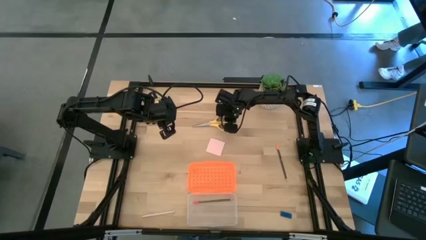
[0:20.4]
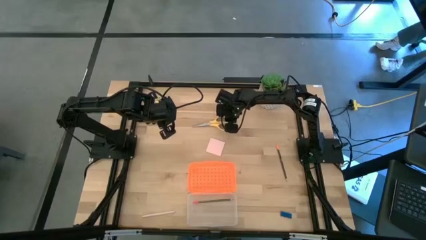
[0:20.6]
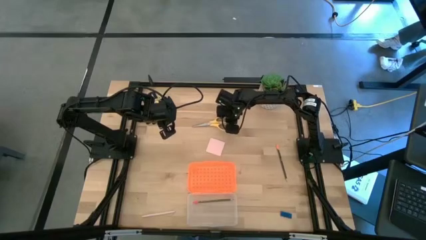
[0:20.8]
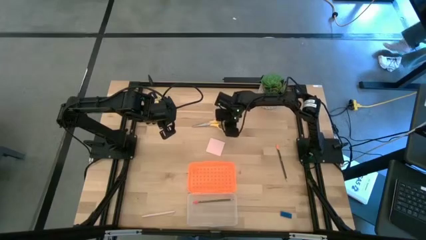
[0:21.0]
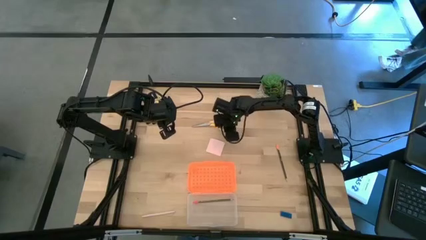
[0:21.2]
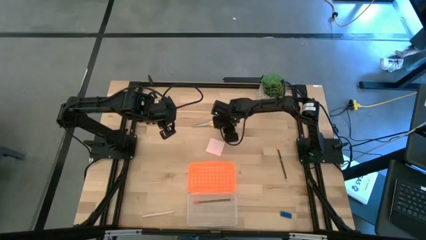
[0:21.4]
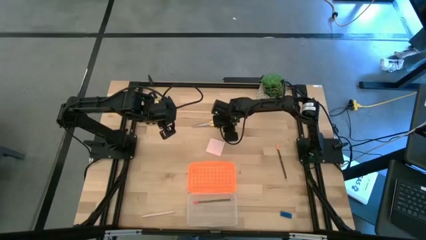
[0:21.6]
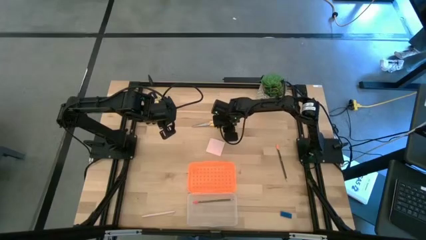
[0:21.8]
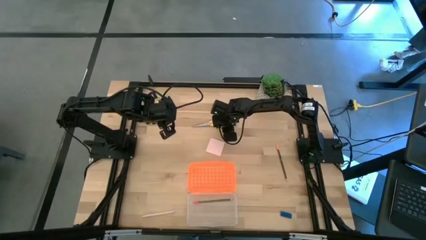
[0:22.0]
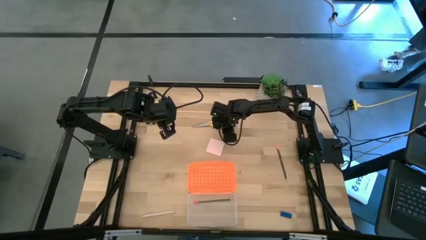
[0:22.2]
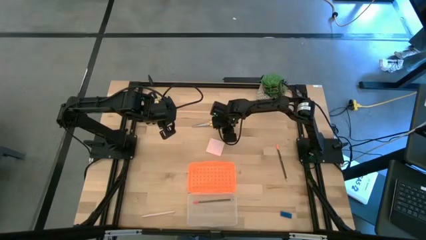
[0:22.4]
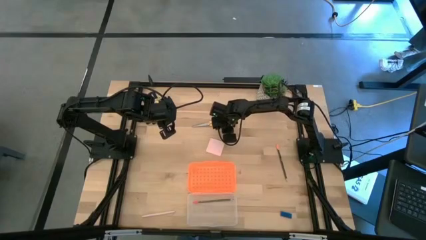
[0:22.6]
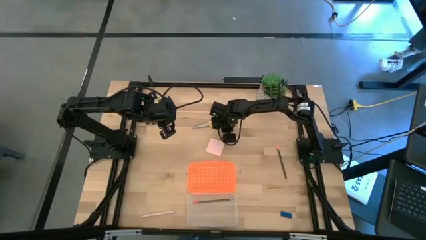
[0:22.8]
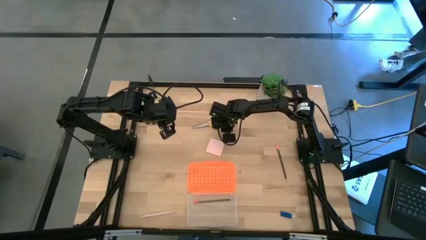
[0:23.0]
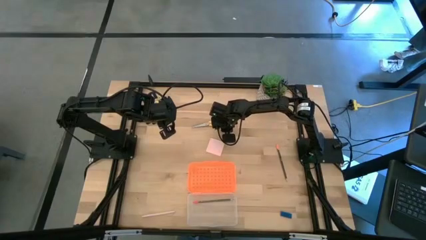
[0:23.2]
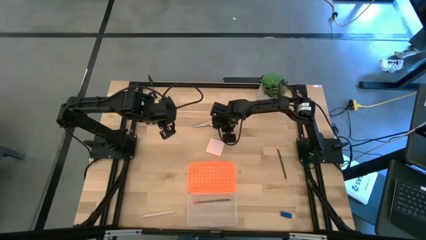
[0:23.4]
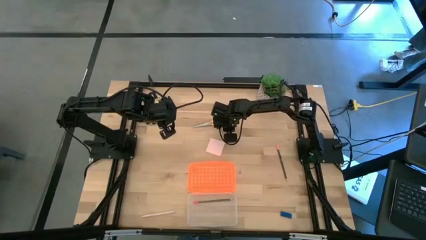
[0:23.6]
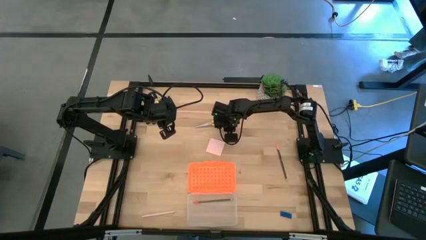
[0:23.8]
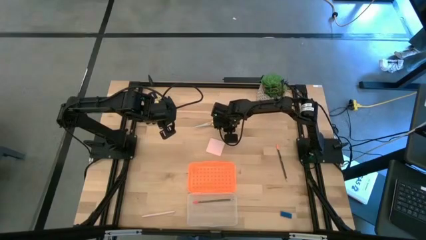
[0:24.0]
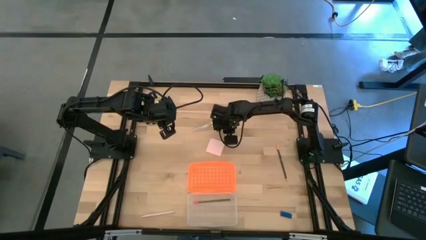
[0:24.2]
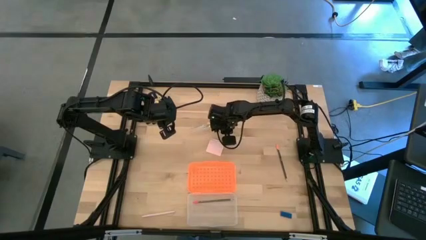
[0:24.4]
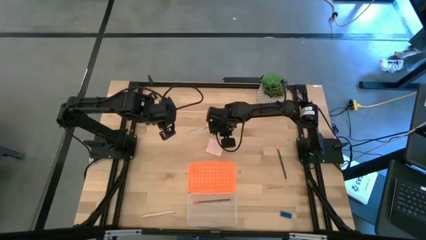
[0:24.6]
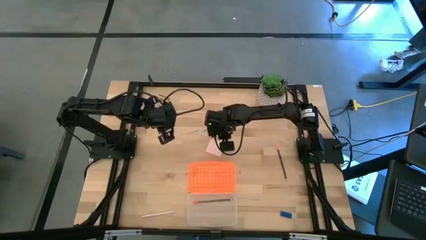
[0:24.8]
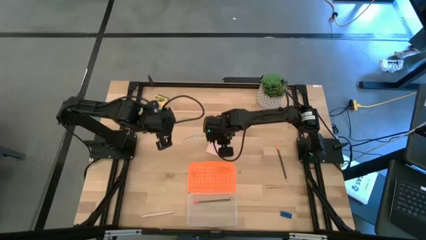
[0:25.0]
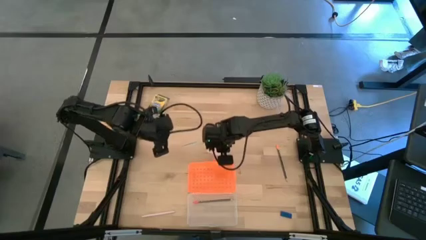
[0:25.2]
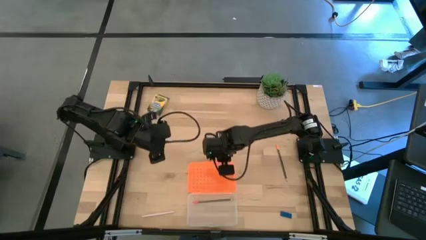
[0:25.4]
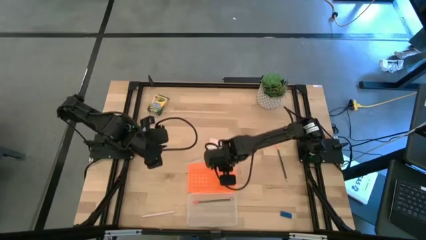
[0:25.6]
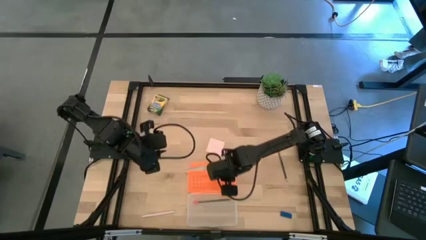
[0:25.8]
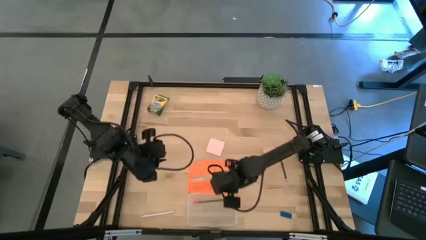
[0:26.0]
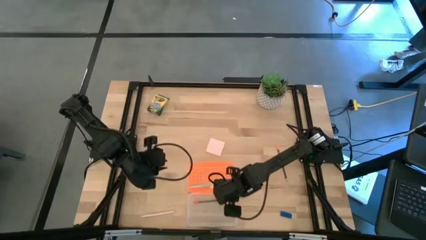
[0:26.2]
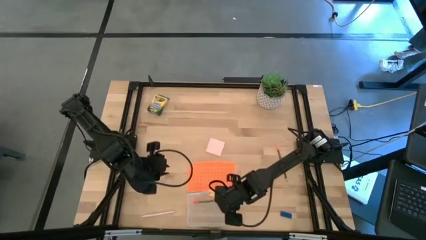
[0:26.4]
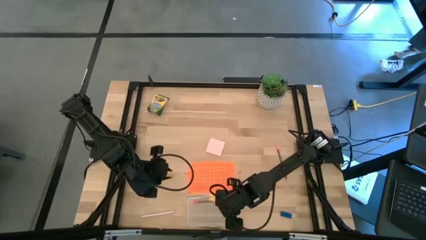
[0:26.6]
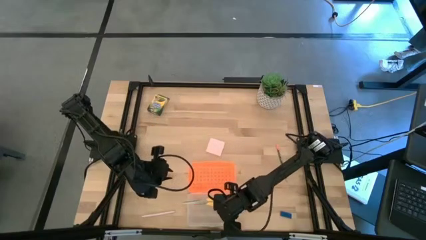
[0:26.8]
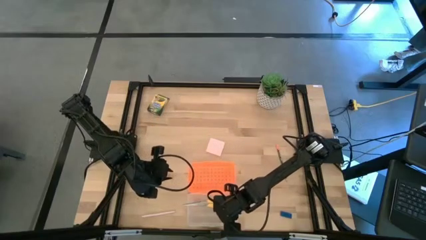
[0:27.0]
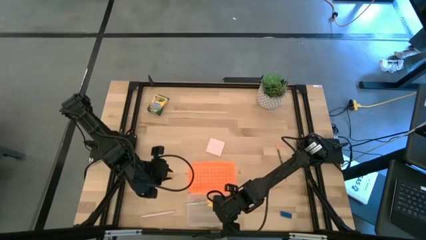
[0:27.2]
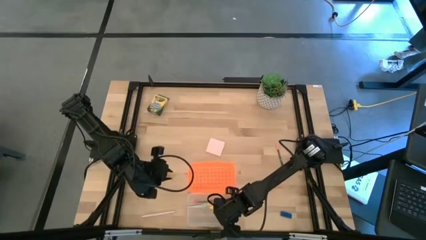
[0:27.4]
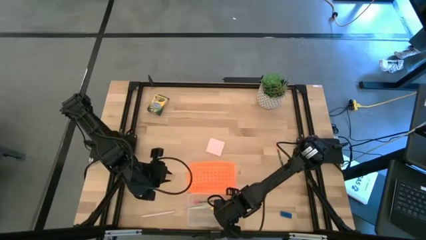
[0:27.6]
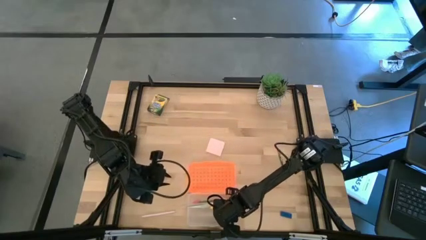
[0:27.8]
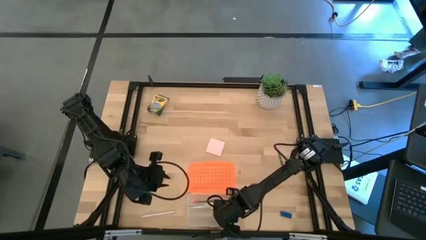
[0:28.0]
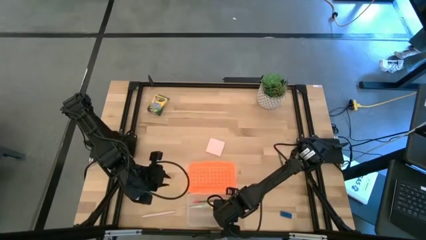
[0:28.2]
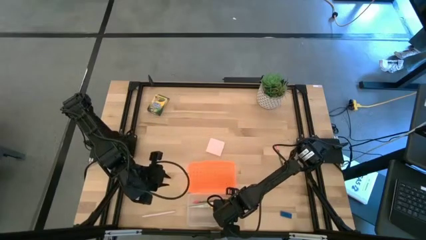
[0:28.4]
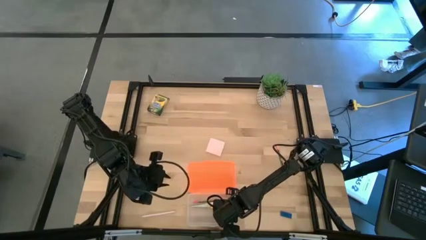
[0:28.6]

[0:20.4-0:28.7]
Task: Pack school essentials
Put the yellow scissors into the supply box

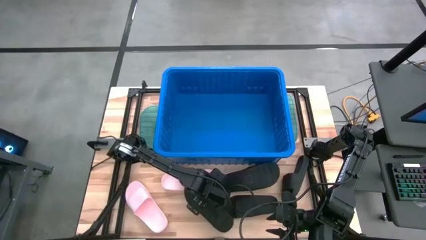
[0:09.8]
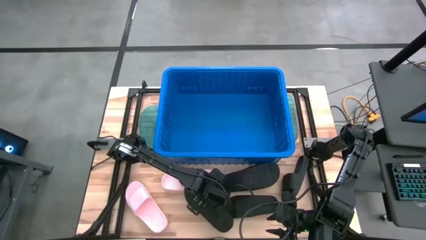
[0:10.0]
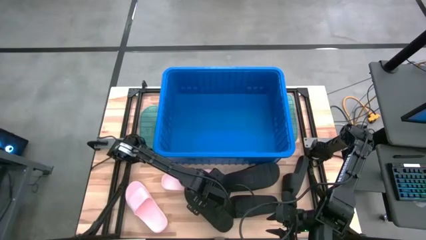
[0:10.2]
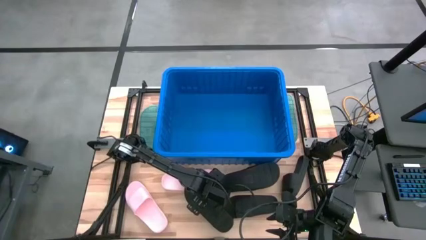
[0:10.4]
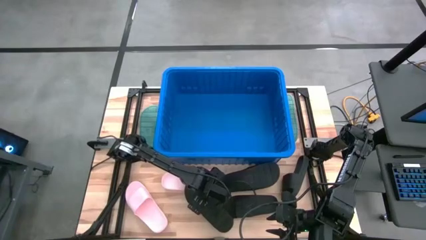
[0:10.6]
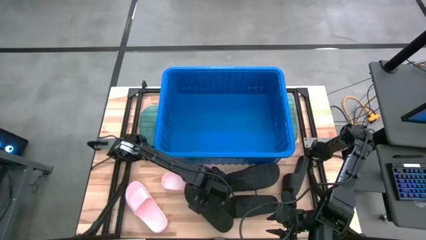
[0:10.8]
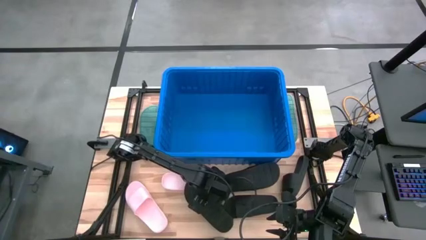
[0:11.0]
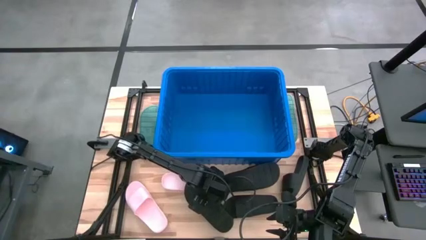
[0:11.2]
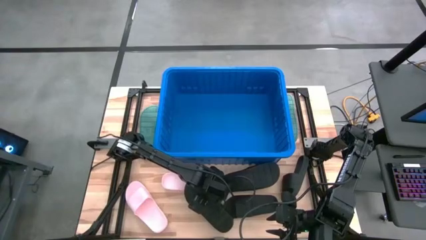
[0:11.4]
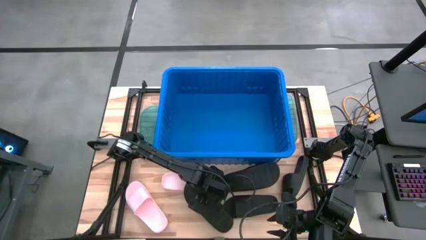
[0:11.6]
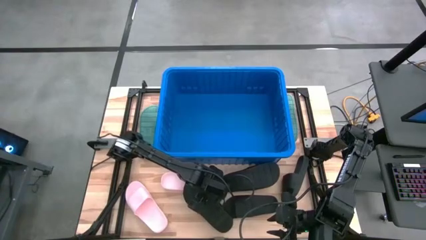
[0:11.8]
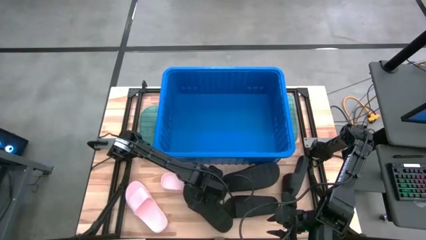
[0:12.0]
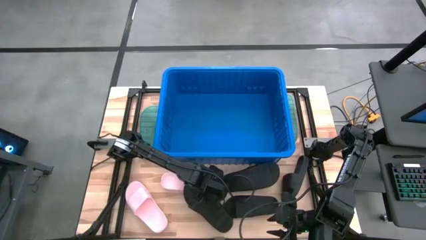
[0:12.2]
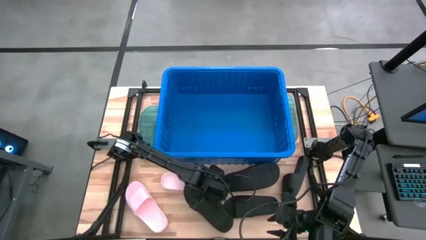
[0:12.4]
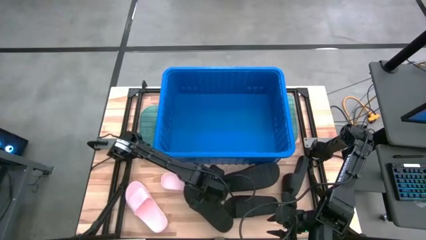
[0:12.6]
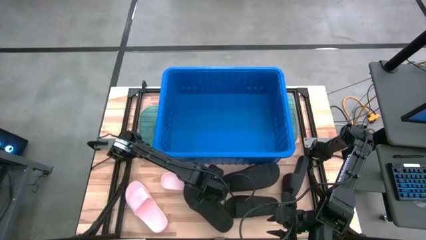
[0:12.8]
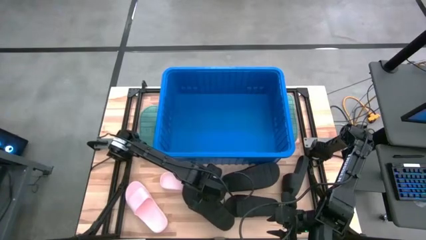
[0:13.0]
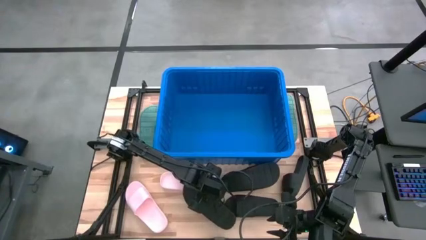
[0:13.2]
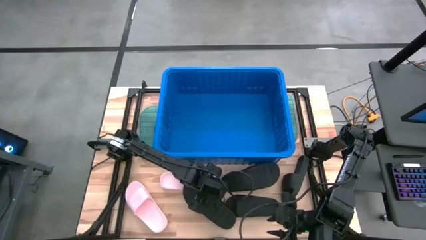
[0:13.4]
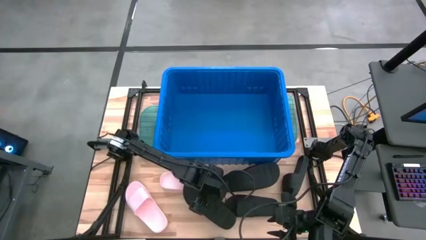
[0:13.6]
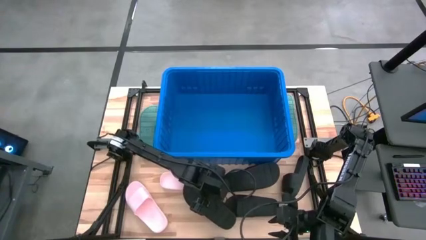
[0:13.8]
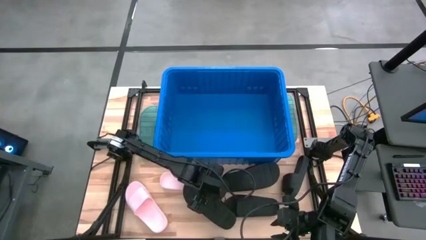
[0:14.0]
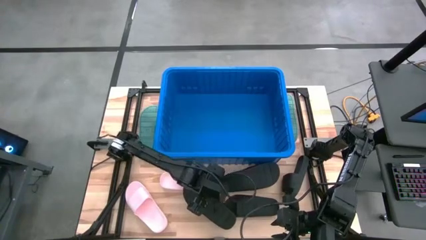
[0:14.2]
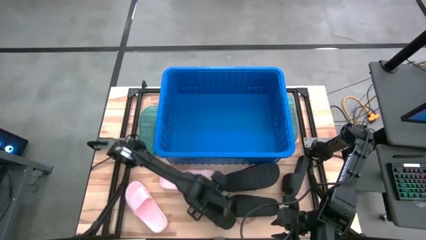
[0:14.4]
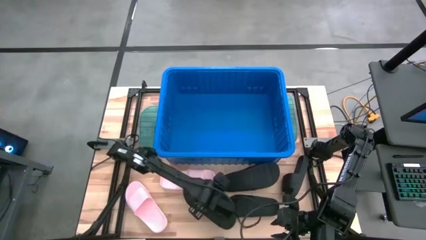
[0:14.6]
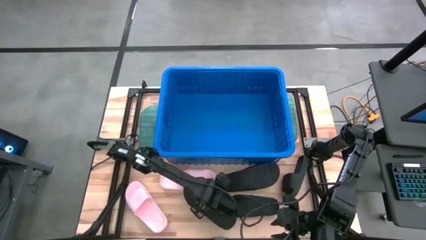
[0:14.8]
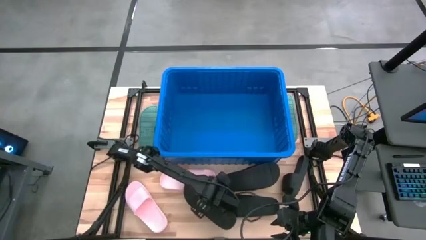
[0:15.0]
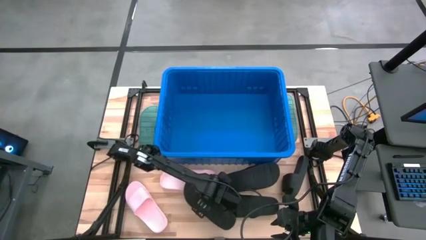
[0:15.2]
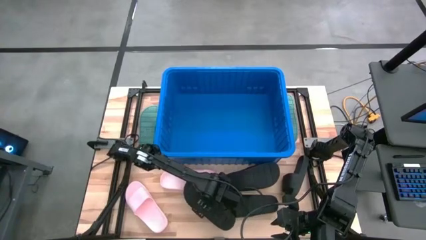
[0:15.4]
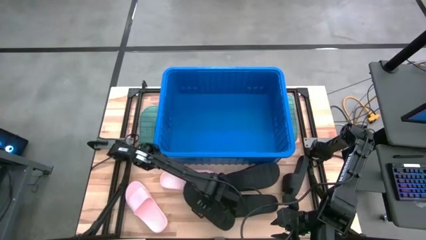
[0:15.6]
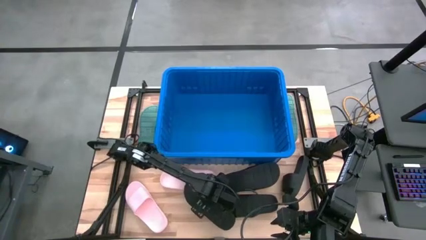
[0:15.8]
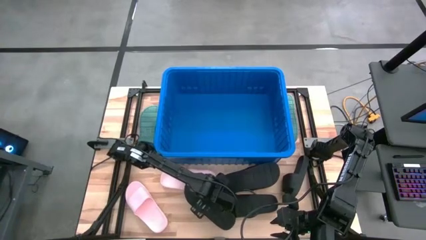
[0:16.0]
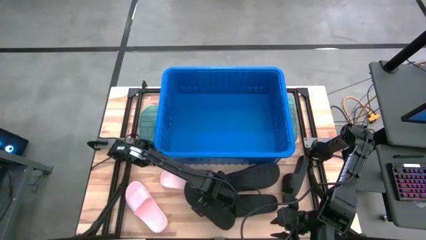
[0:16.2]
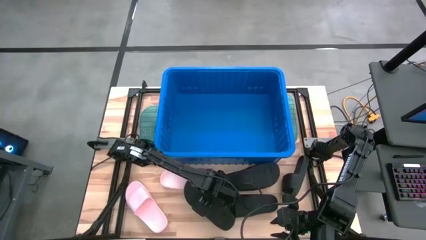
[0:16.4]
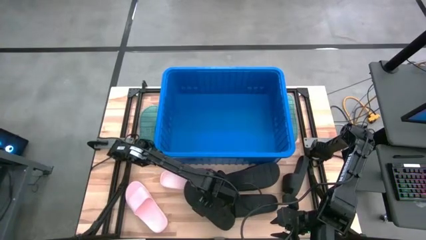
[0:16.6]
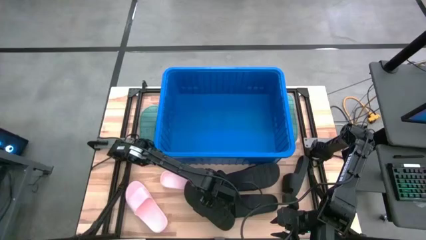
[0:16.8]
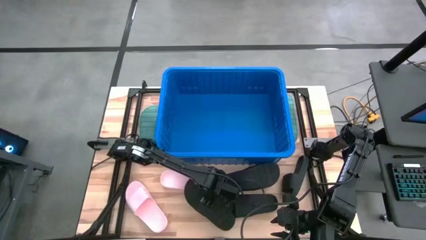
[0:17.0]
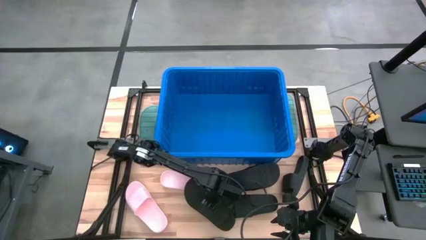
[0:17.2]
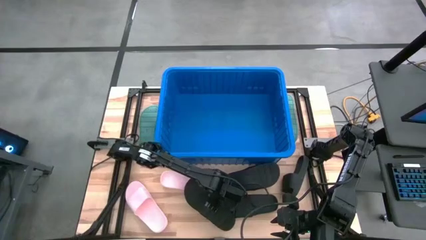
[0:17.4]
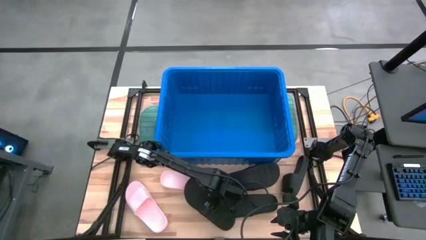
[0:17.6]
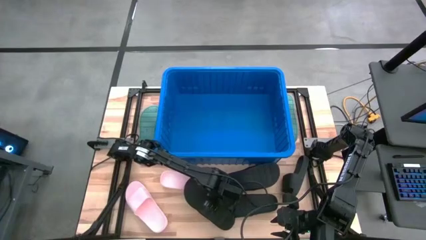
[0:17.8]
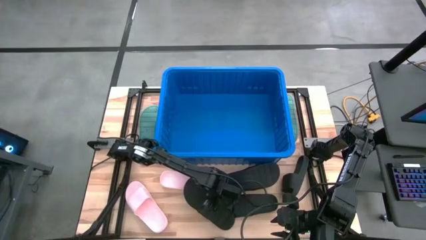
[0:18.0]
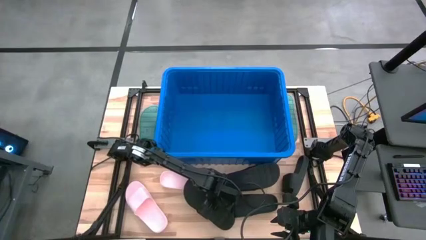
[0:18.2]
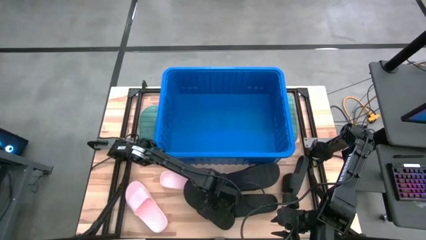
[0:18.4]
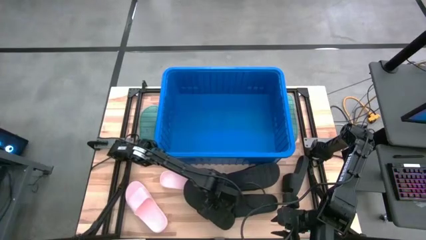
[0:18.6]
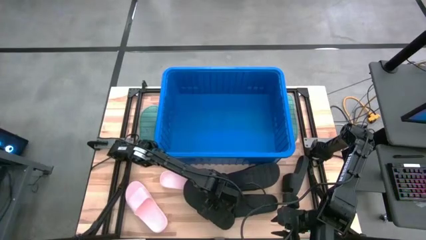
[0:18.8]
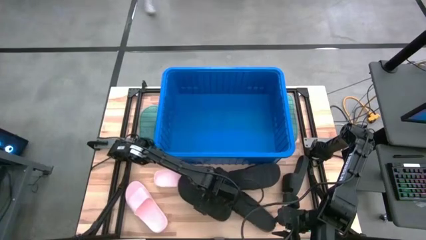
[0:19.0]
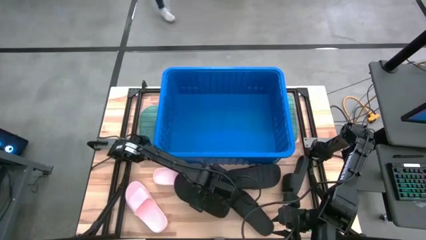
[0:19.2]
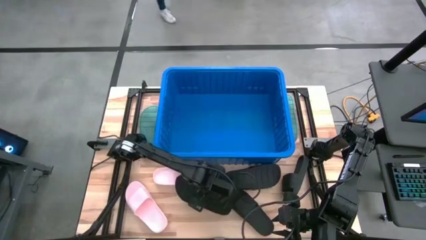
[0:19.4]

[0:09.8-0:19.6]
Task: Pick and place slides into bin
Put the black slipper into the blue bin
